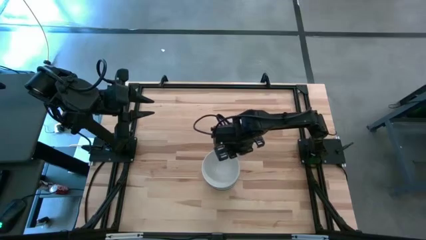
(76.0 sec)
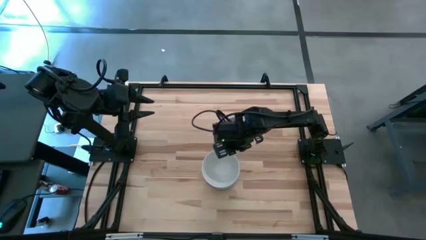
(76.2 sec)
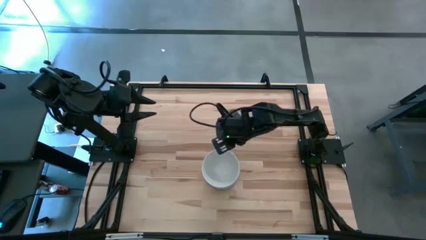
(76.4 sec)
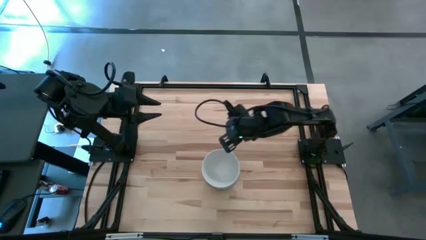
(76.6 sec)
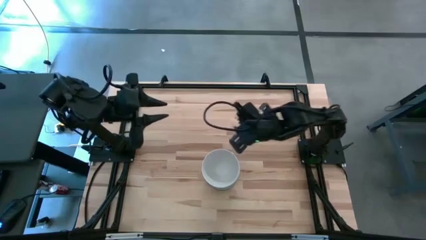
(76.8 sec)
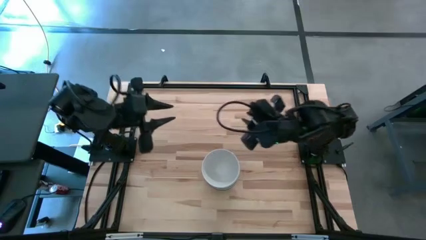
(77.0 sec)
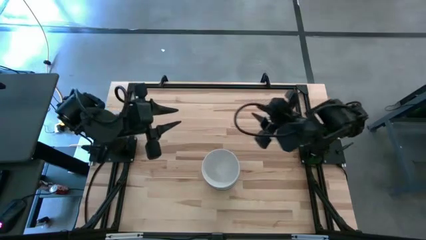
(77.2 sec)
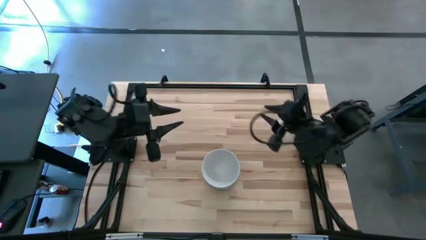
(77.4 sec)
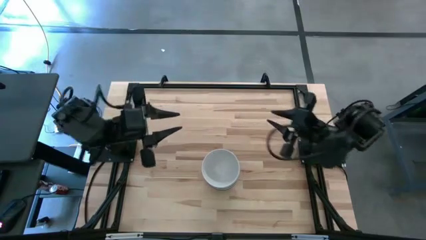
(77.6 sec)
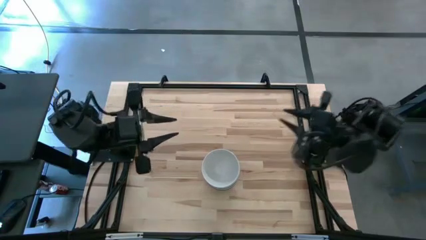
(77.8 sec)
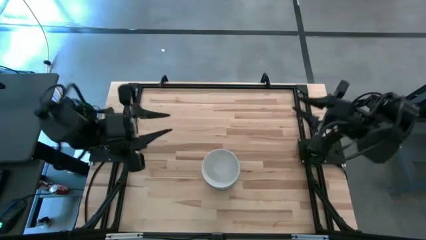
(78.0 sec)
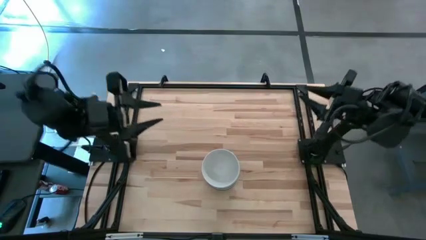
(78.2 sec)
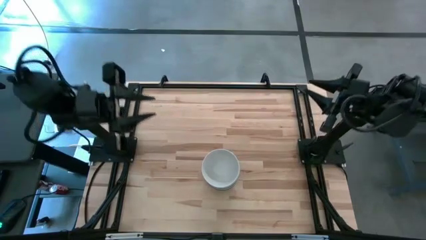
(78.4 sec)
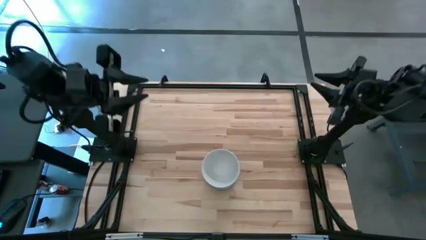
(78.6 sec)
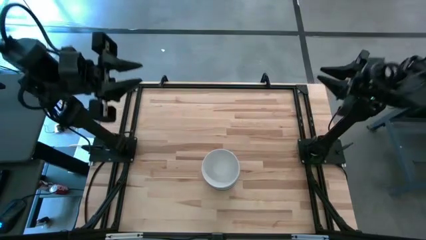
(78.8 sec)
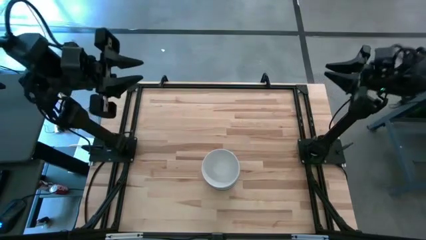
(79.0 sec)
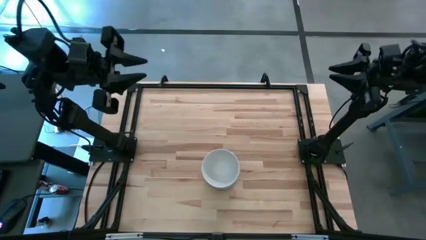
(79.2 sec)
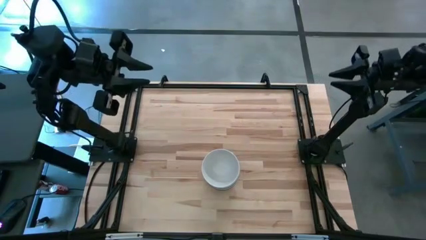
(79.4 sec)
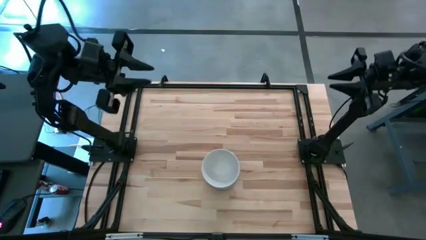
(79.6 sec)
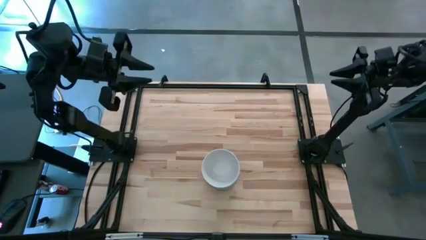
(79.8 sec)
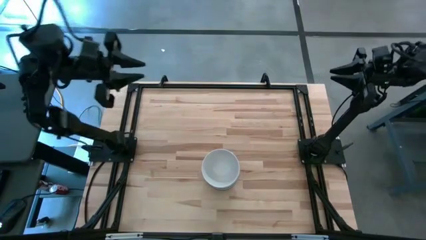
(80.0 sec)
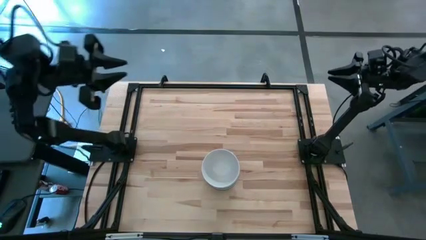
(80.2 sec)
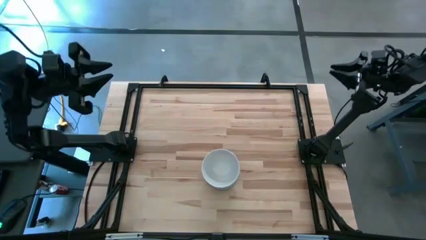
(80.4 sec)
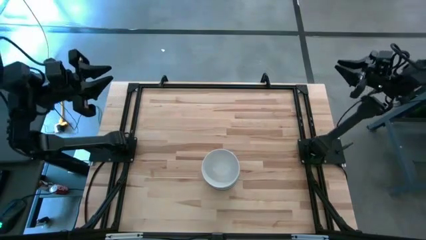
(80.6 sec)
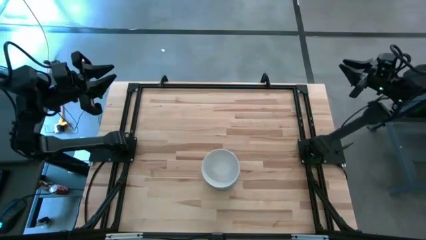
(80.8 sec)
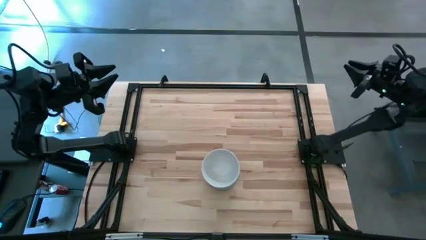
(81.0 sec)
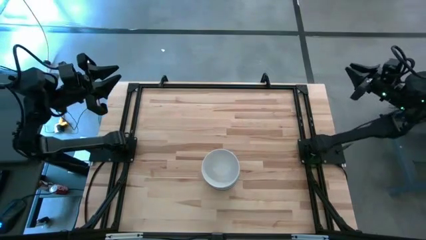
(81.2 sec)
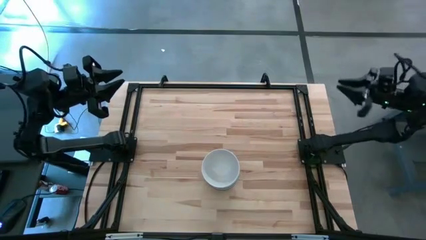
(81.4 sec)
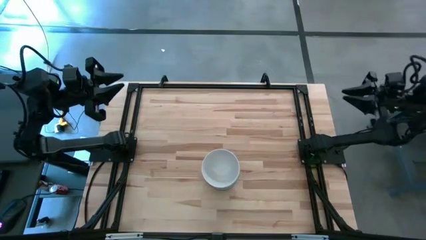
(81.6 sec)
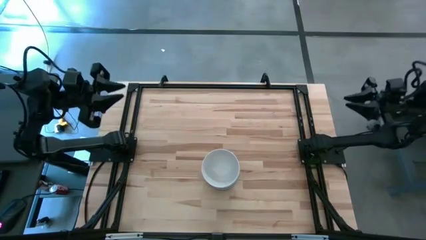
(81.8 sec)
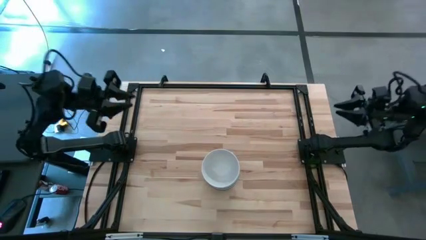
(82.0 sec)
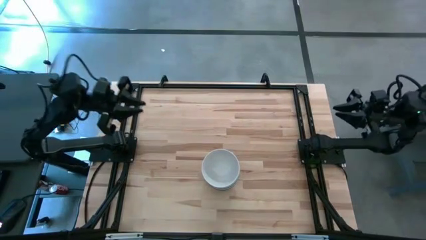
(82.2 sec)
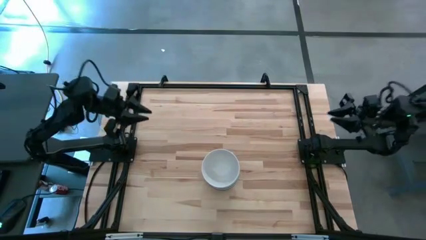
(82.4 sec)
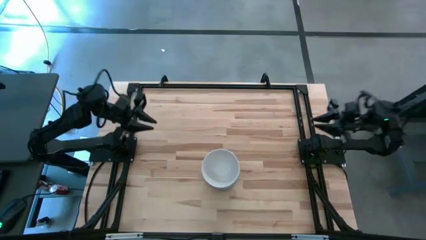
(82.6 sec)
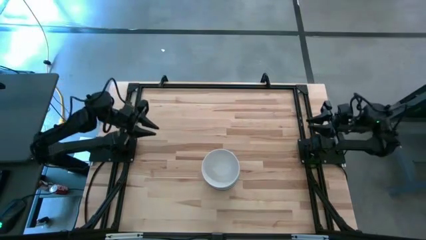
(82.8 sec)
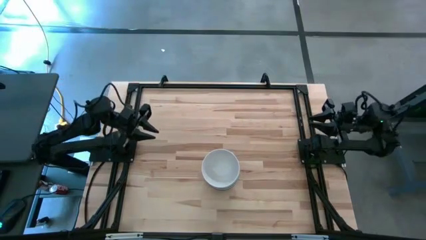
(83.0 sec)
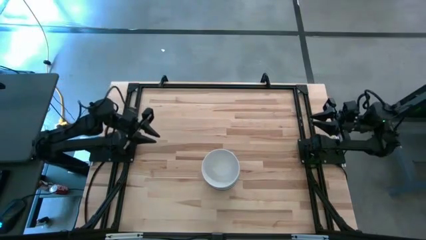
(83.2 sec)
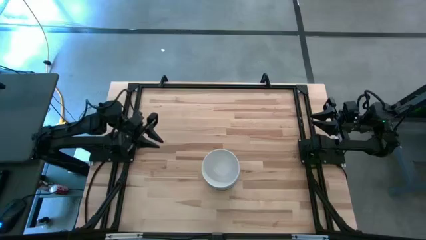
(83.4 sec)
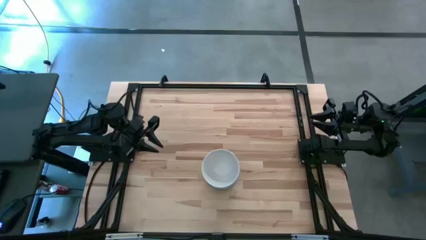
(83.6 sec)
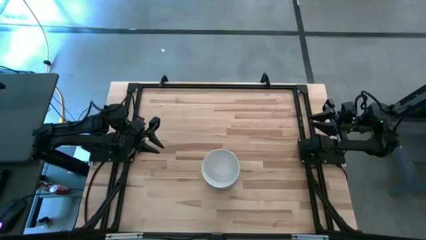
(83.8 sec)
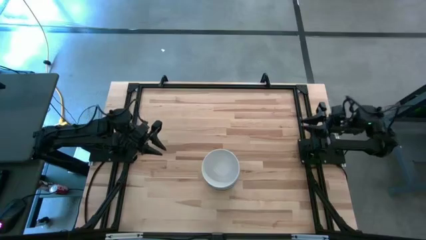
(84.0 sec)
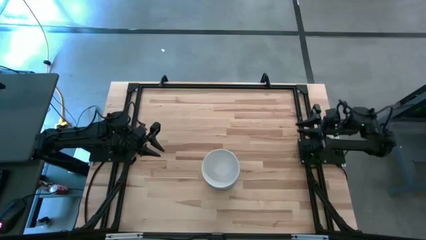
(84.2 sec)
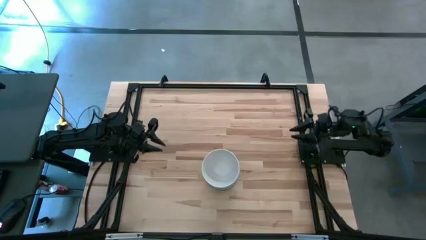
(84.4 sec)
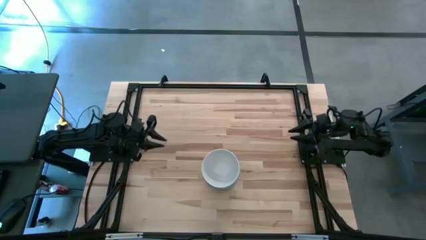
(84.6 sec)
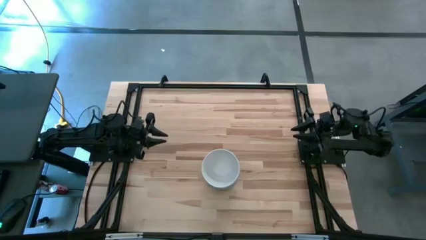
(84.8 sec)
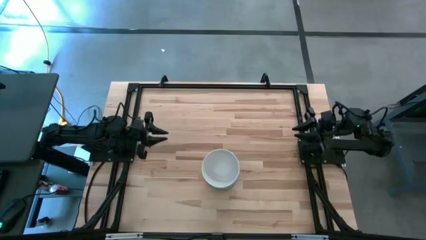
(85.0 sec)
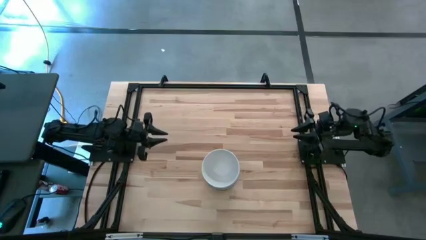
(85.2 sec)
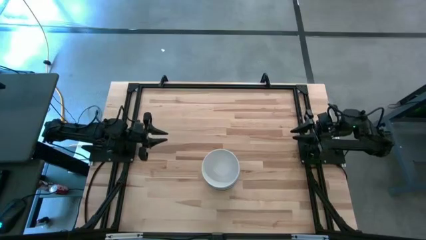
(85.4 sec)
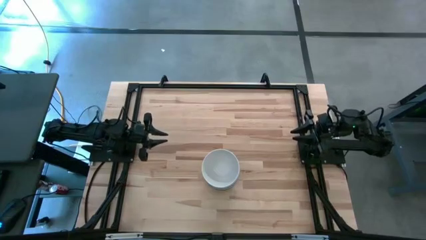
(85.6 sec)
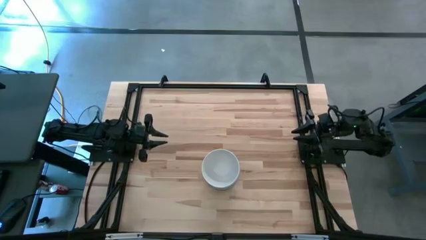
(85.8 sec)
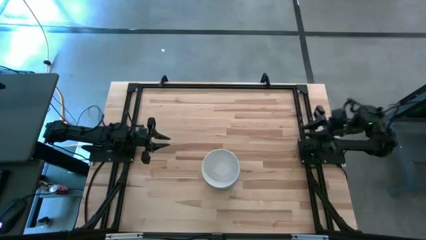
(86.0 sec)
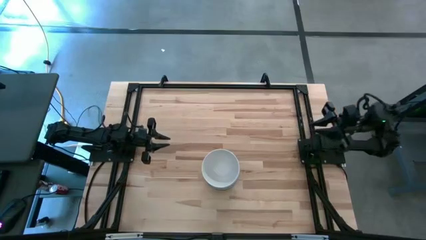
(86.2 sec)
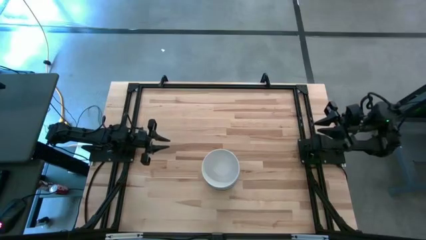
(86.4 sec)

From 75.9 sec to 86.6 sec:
Task: Nest bowls inside each other
Return to Home Position
